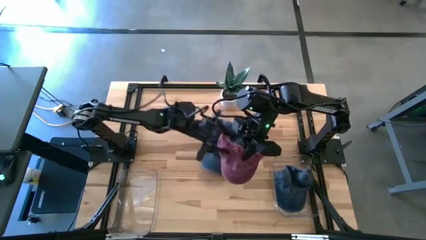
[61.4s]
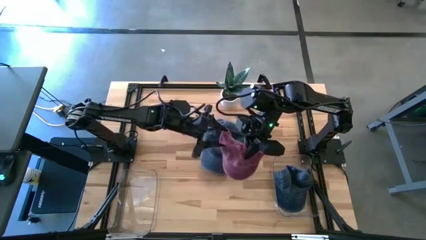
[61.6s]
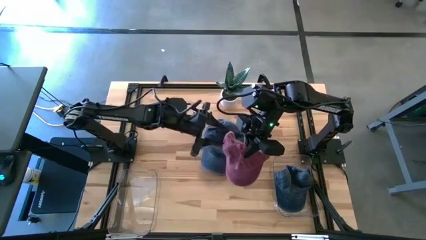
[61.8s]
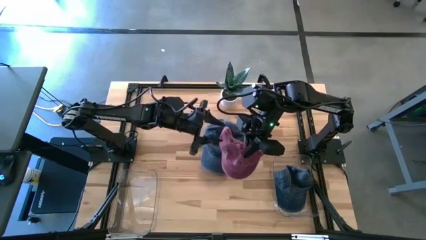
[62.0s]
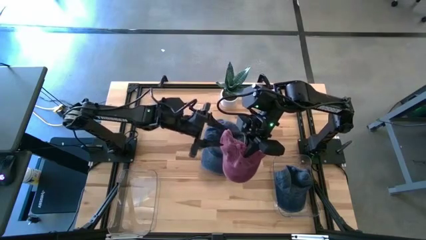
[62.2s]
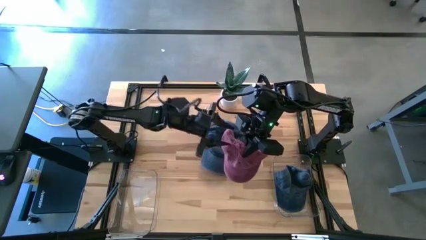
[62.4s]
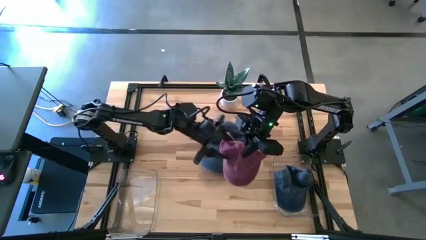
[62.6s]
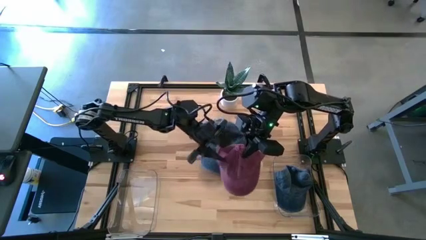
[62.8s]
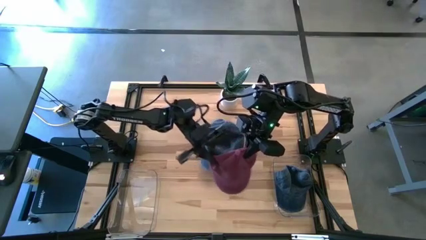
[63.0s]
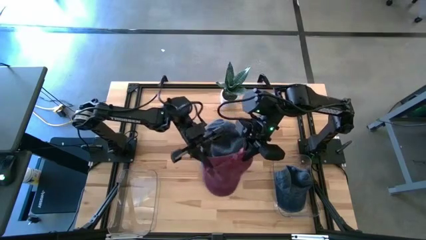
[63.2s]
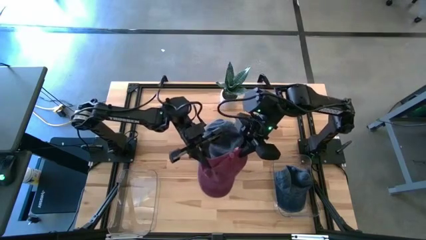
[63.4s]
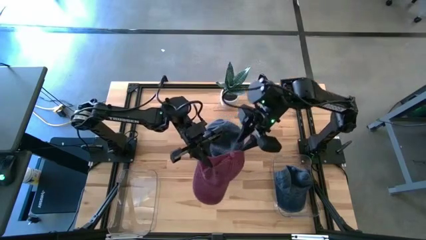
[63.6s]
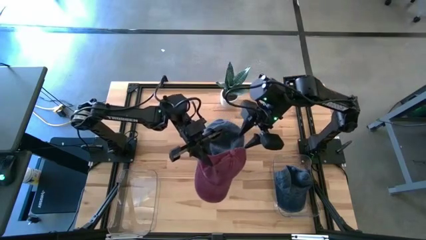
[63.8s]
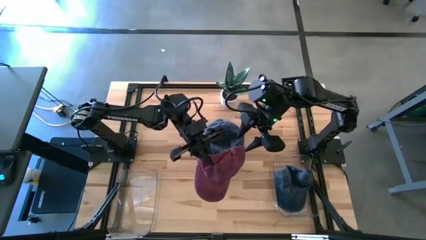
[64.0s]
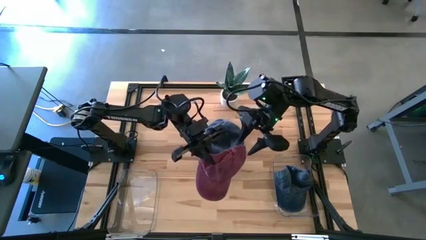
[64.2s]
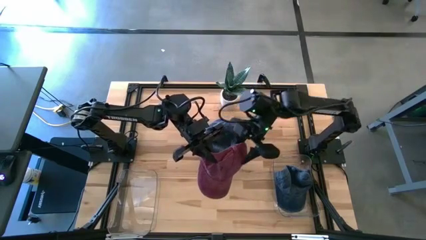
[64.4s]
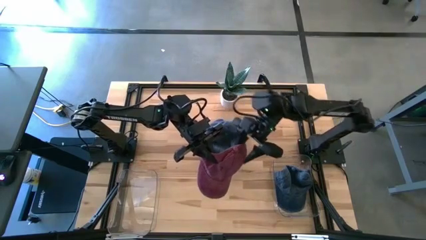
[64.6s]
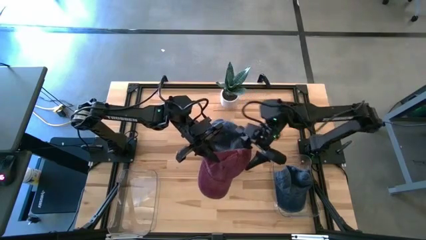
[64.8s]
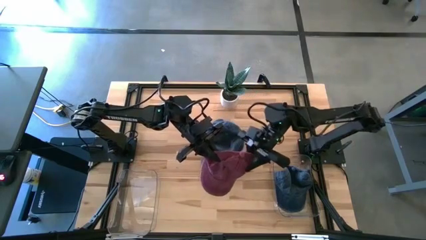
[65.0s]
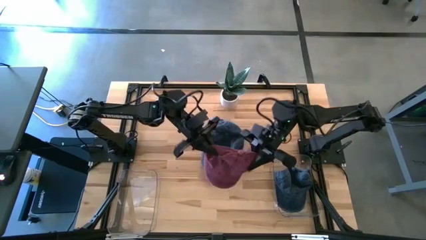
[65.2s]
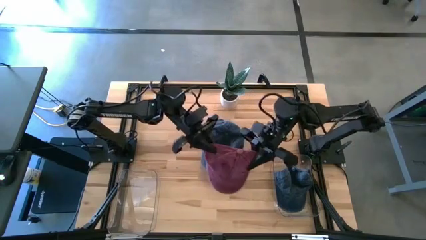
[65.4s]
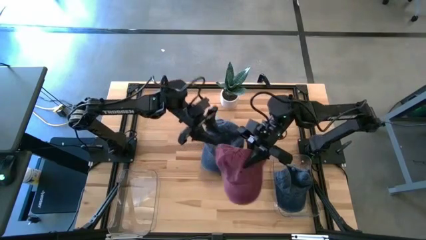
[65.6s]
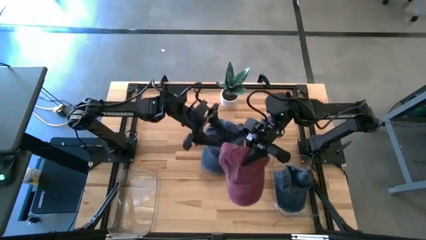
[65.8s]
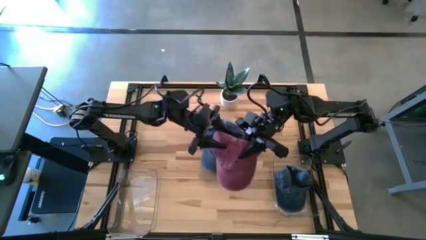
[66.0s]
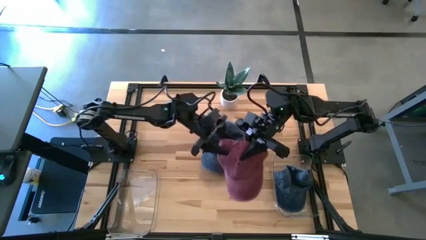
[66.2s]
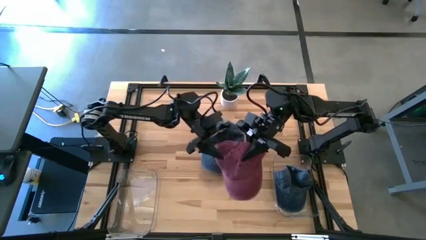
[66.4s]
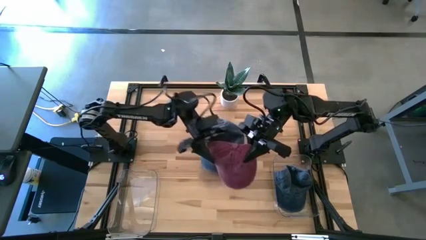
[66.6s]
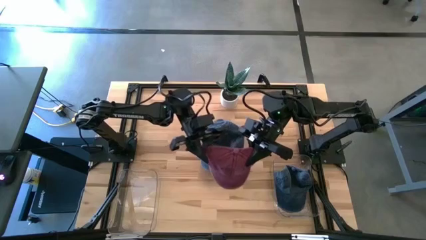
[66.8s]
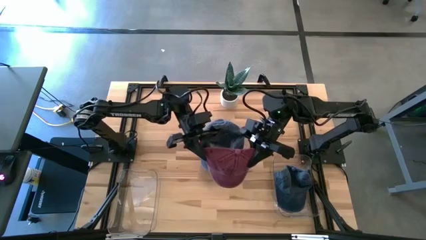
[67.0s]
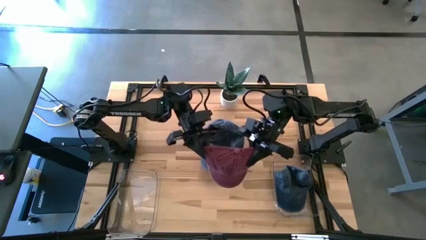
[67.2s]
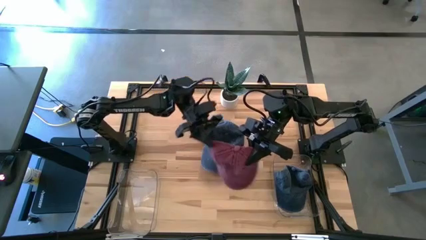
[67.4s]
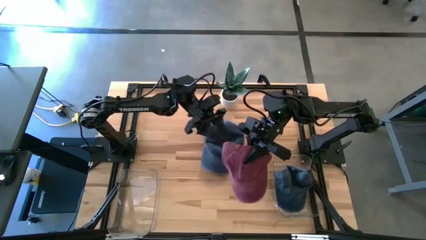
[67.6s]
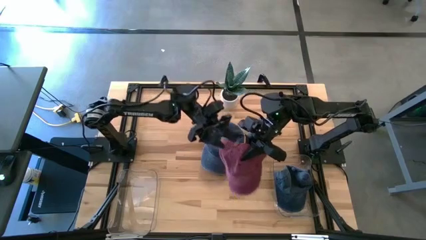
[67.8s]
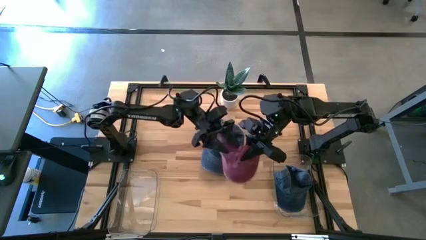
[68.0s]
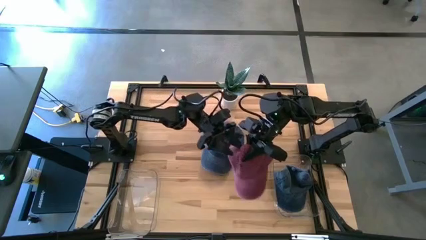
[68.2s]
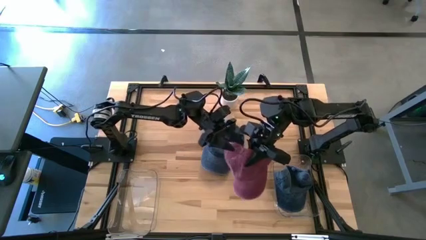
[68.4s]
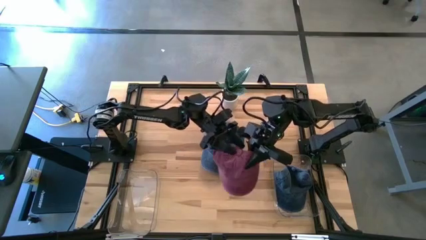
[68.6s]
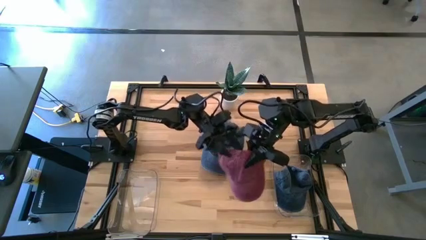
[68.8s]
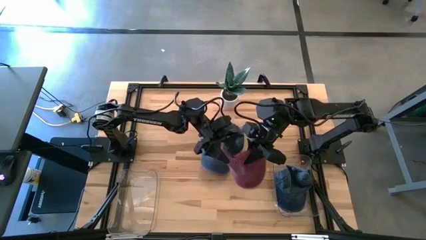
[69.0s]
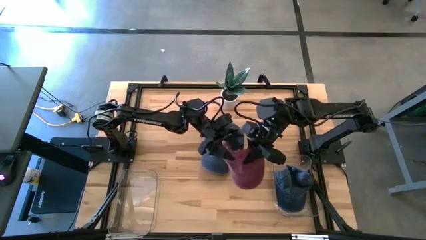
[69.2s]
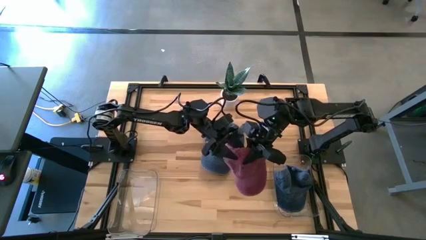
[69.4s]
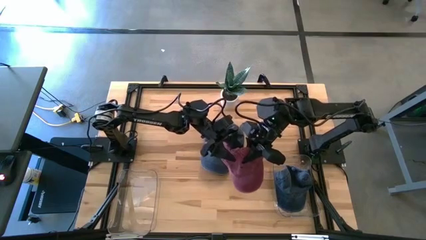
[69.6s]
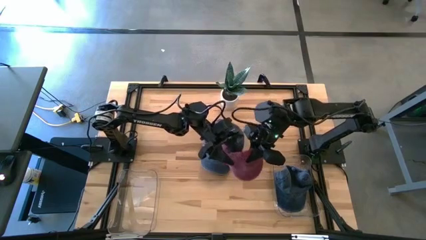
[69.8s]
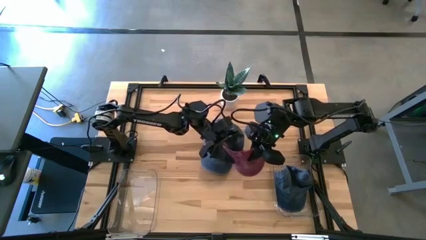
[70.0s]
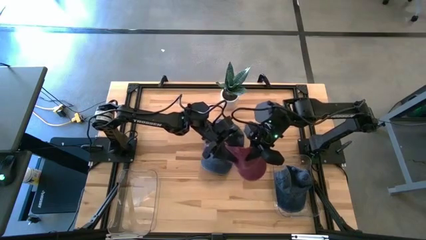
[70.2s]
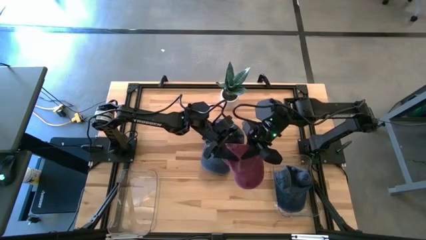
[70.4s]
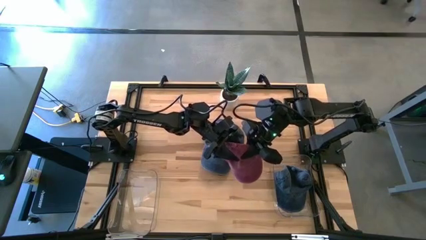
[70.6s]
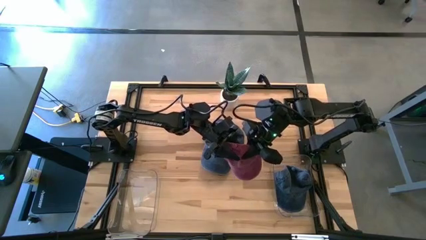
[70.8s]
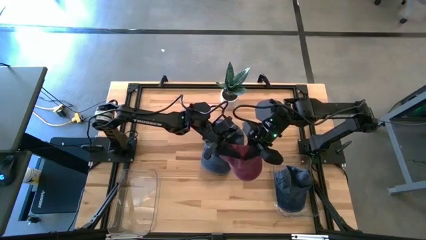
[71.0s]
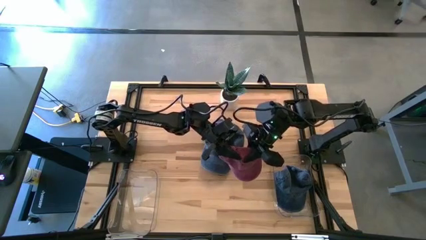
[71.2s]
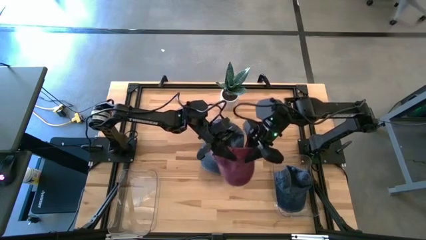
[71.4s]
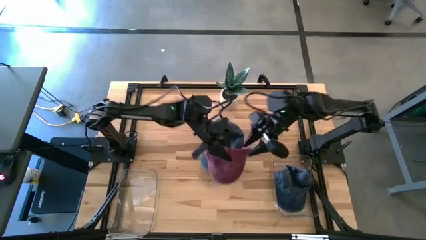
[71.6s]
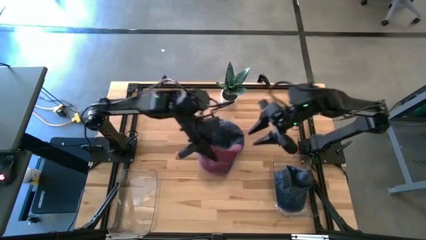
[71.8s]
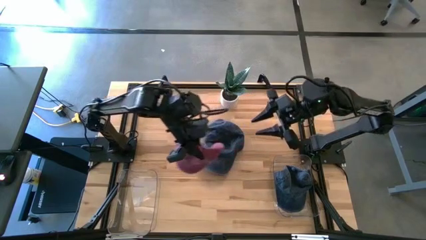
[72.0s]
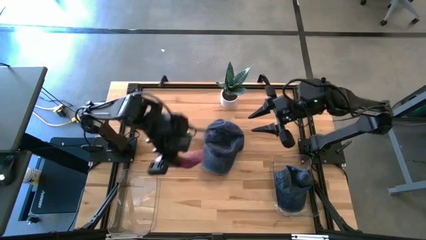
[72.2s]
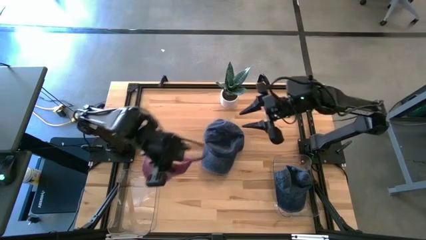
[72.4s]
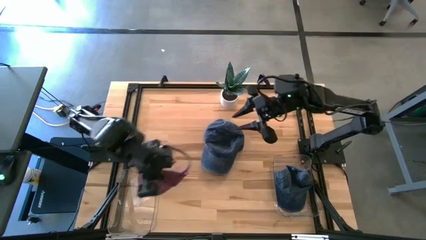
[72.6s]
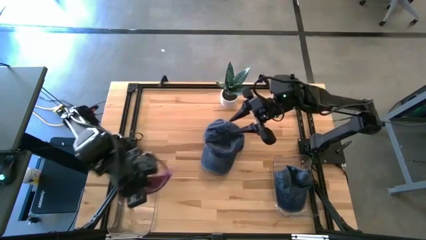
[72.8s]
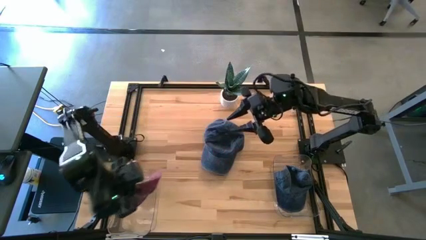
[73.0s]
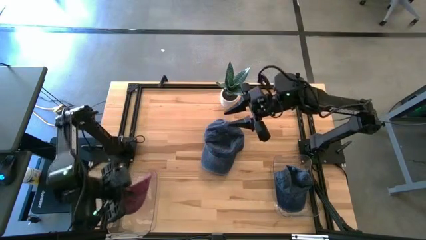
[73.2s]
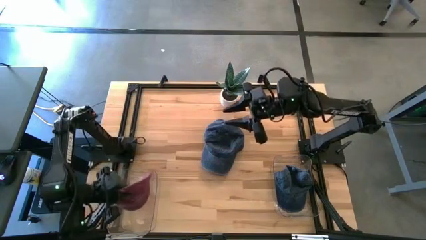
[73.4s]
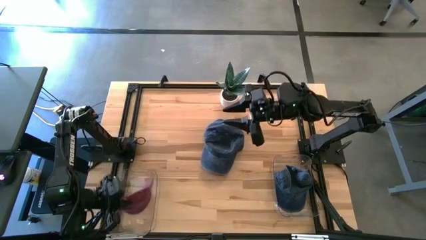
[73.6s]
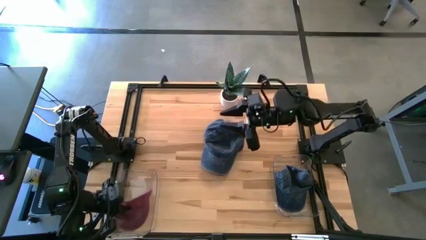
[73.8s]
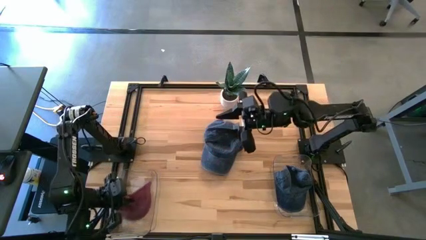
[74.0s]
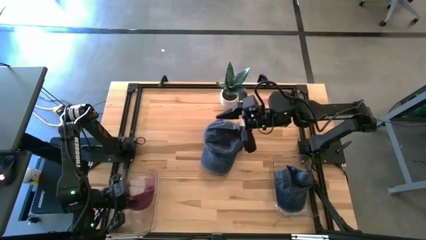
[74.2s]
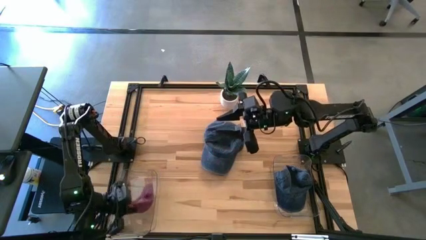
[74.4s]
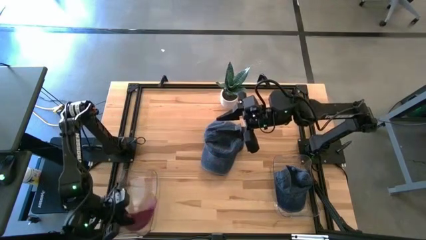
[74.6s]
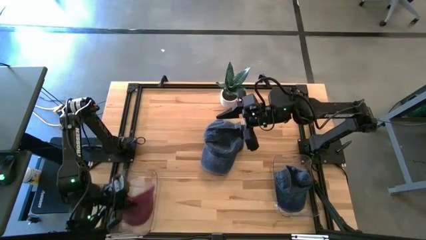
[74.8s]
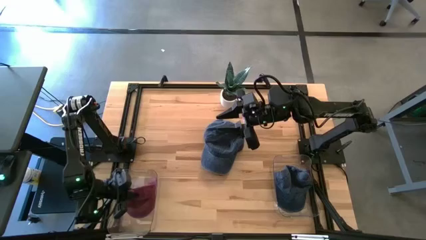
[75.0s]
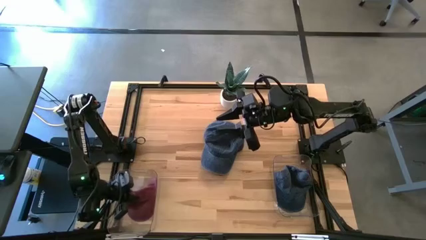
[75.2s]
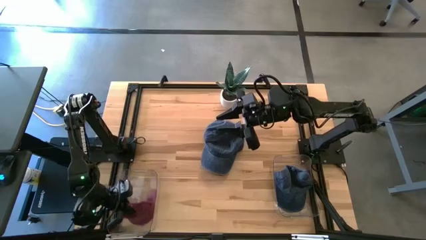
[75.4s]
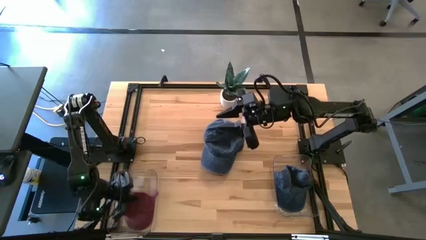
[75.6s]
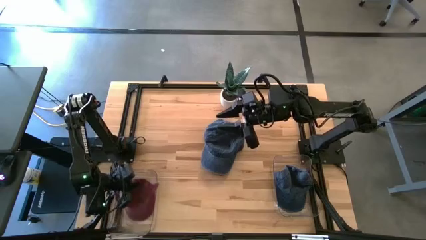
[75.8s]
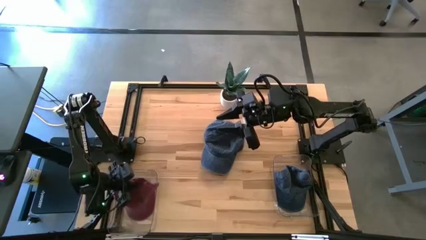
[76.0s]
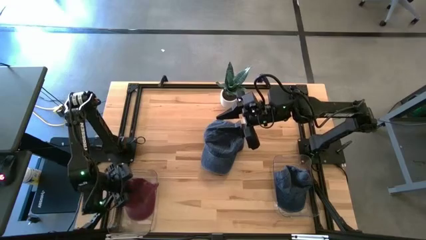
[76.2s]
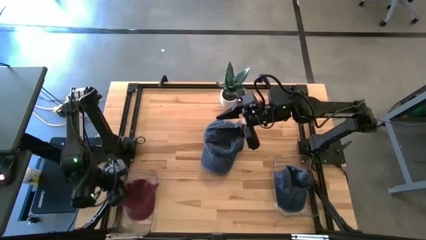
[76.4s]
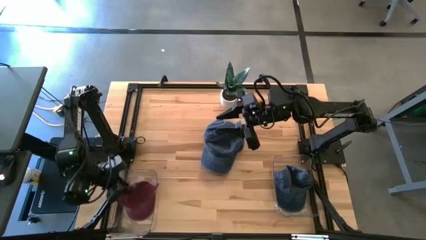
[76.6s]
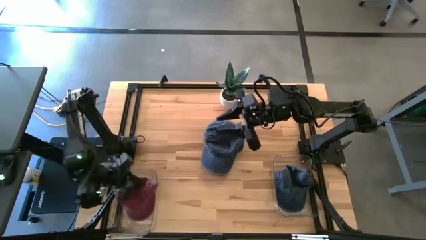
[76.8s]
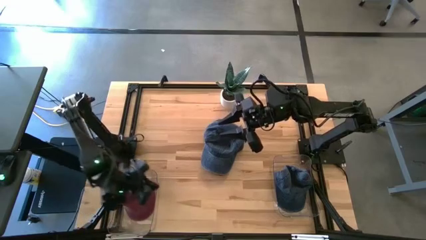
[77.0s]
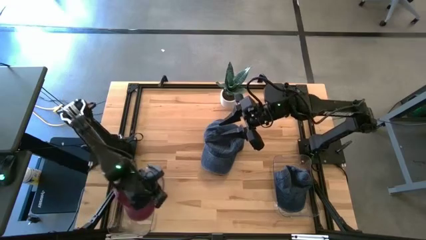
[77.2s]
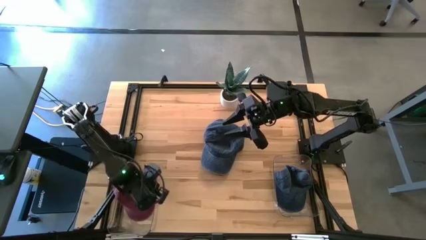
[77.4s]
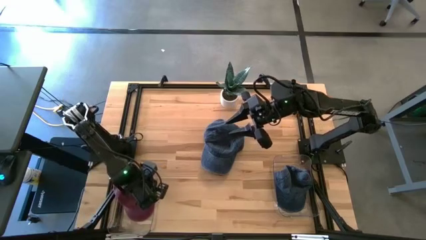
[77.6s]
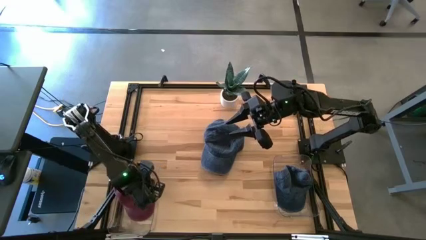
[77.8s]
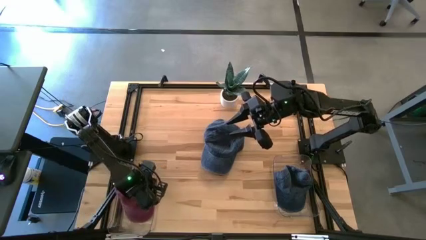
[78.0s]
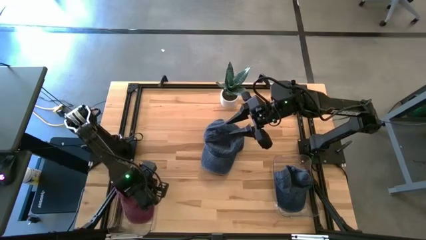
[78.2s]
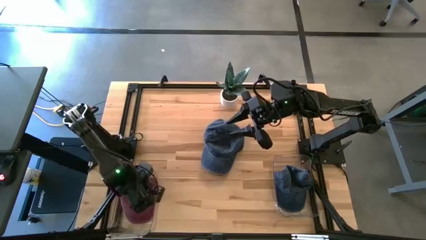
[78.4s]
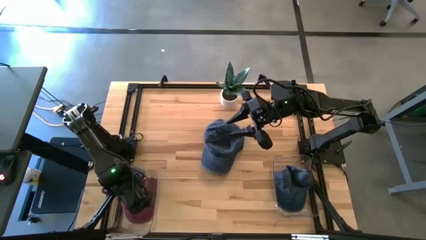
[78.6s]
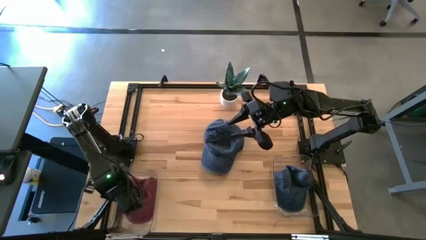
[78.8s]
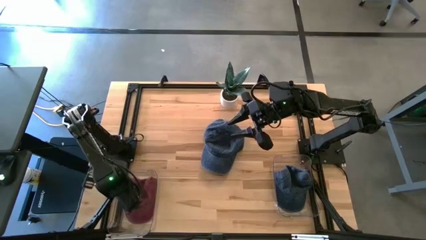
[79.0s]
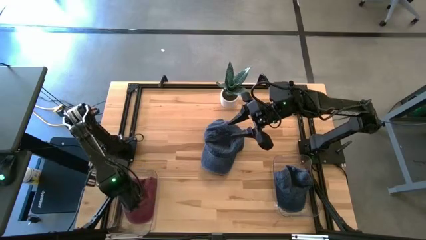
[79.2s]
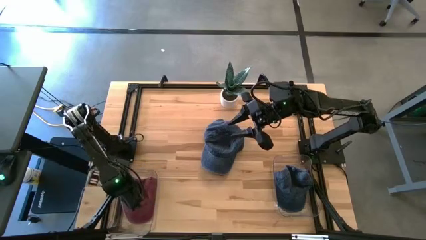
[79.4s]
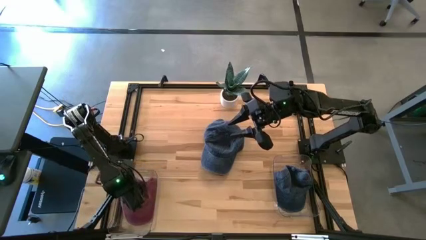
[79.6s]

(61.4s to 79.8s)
Task: Pick & Place hat
Put the red cap into the left transparent bin
